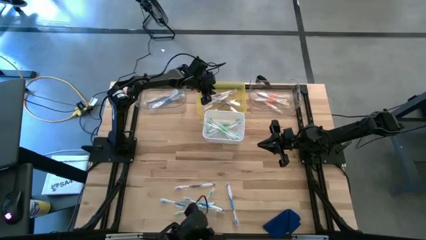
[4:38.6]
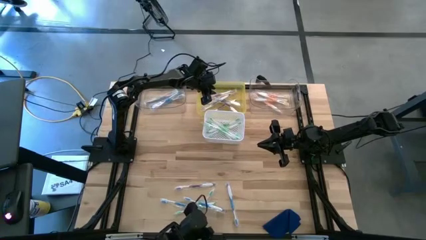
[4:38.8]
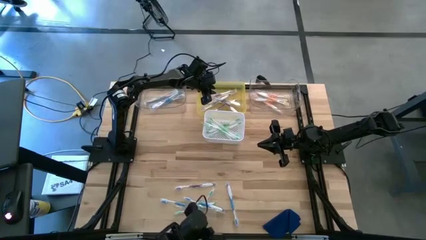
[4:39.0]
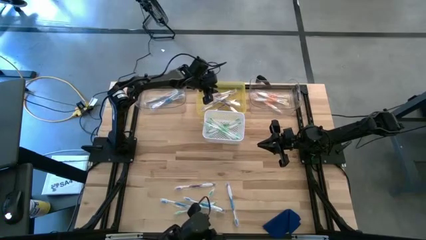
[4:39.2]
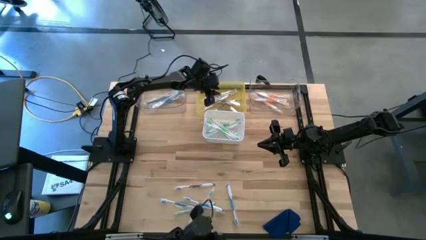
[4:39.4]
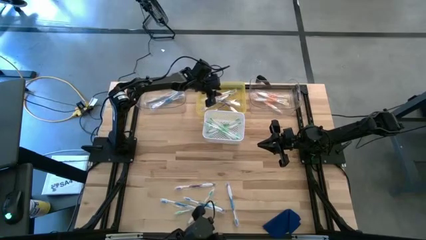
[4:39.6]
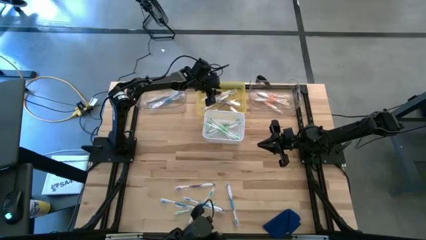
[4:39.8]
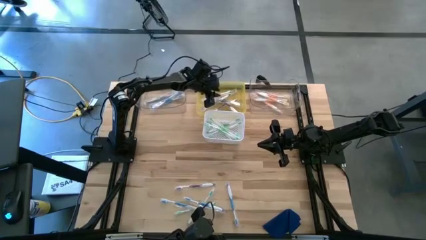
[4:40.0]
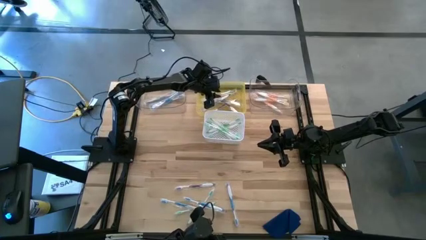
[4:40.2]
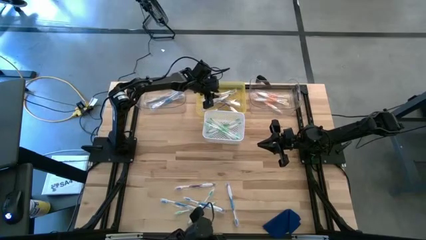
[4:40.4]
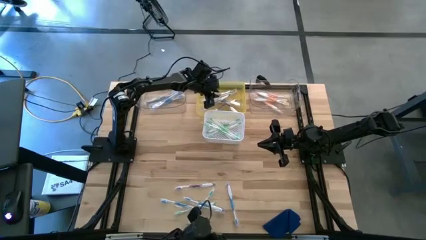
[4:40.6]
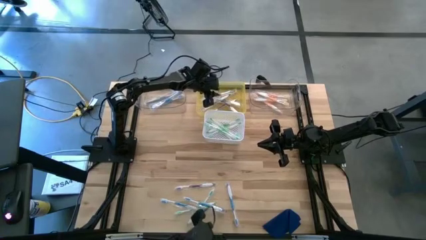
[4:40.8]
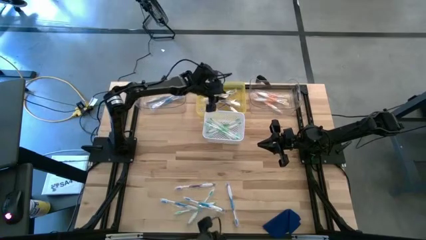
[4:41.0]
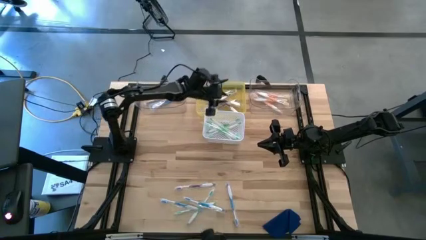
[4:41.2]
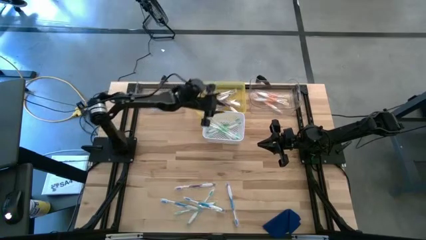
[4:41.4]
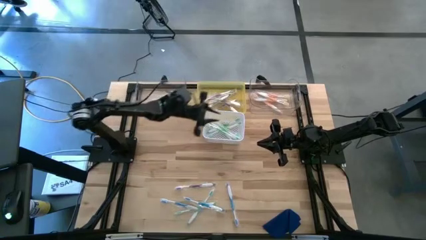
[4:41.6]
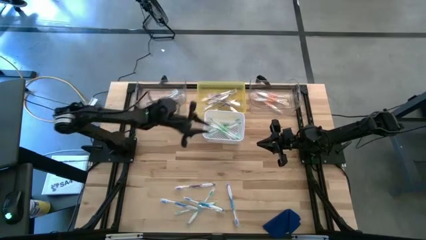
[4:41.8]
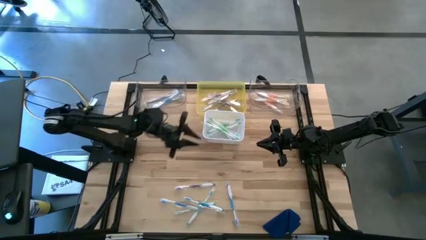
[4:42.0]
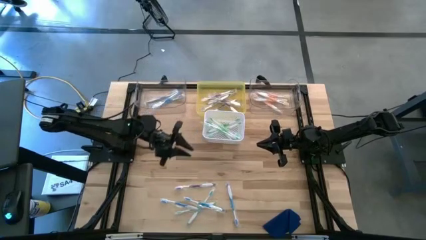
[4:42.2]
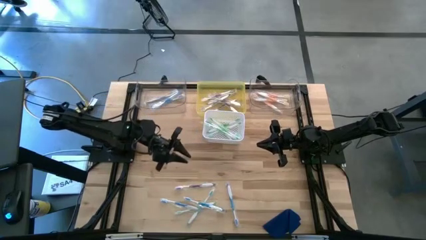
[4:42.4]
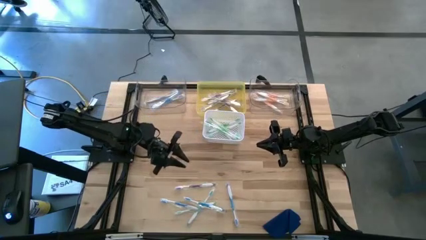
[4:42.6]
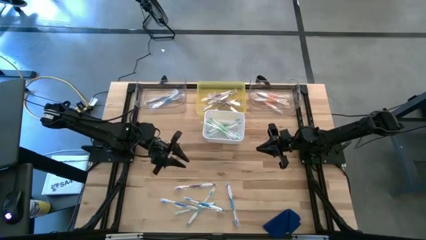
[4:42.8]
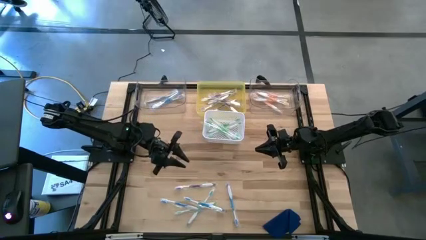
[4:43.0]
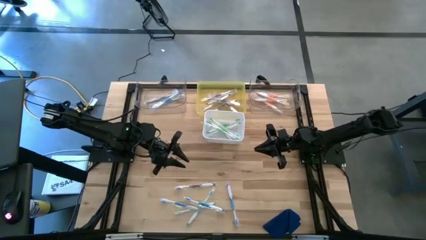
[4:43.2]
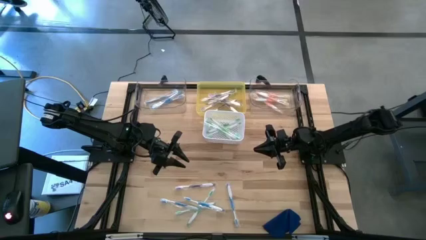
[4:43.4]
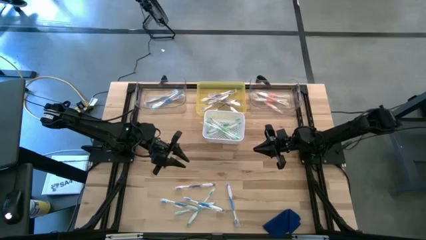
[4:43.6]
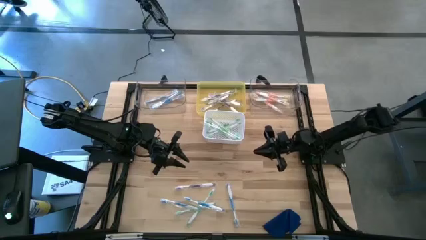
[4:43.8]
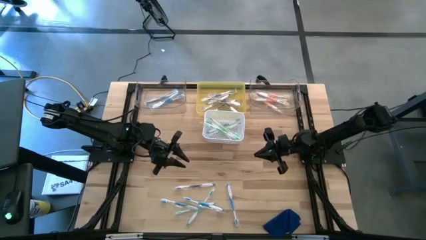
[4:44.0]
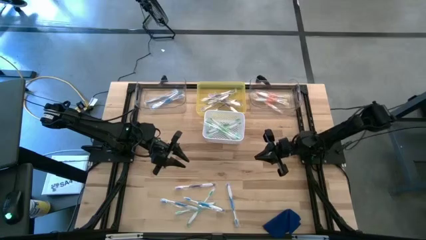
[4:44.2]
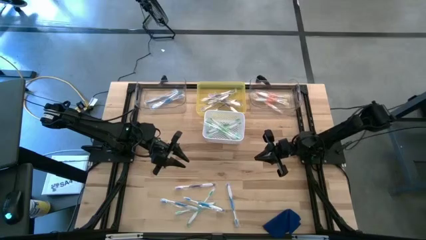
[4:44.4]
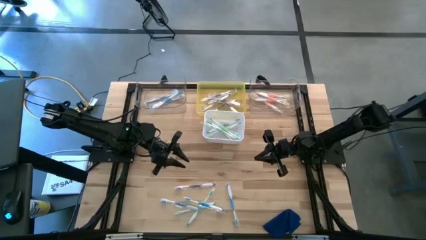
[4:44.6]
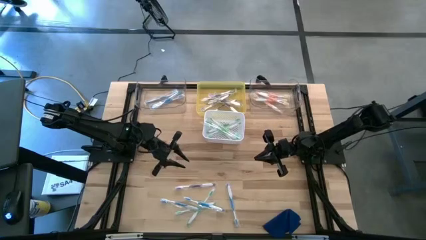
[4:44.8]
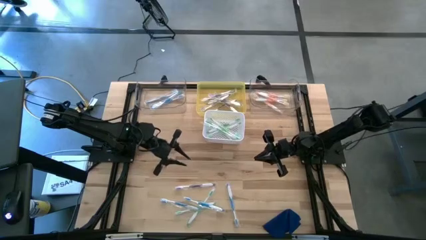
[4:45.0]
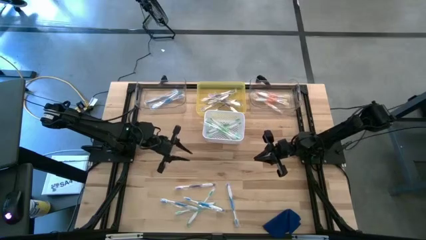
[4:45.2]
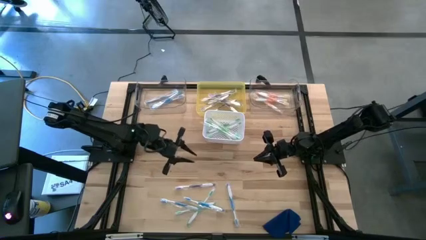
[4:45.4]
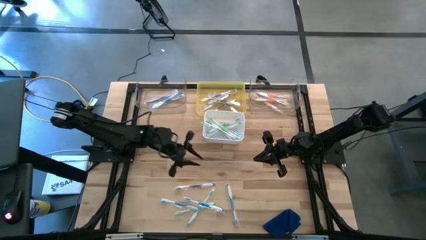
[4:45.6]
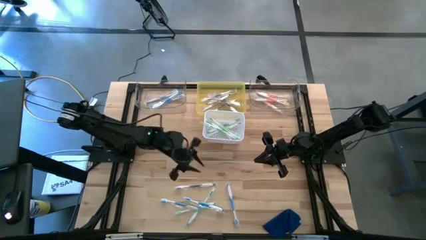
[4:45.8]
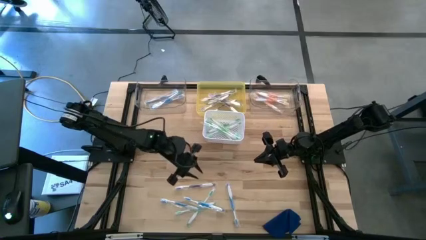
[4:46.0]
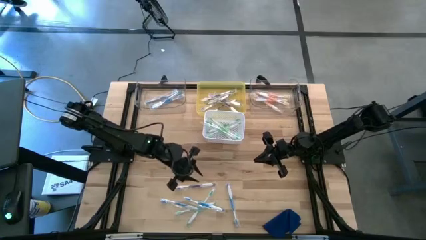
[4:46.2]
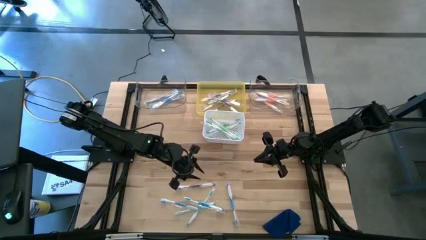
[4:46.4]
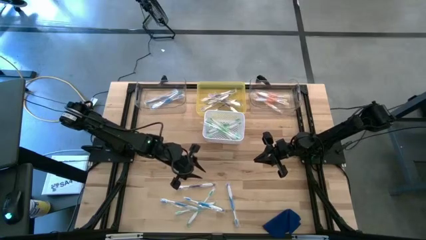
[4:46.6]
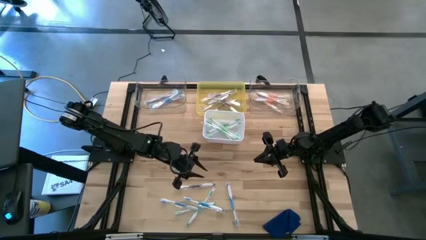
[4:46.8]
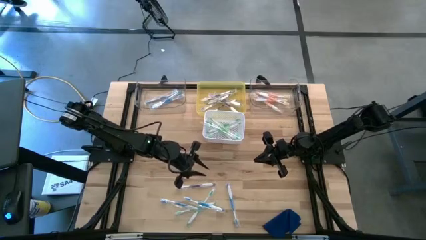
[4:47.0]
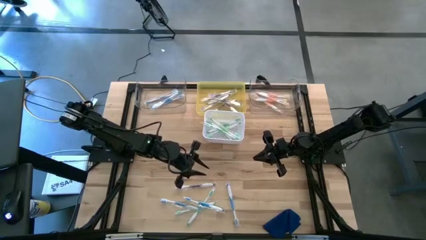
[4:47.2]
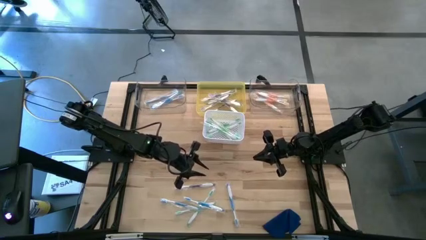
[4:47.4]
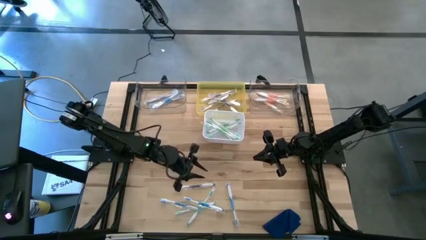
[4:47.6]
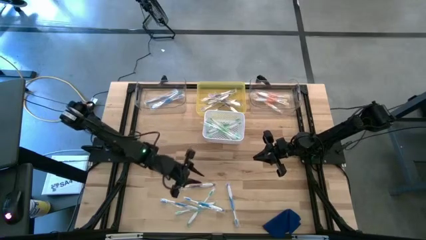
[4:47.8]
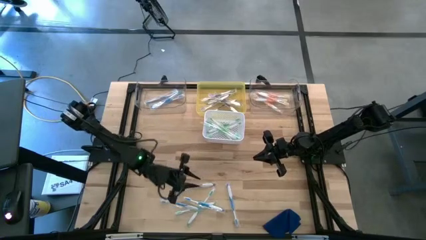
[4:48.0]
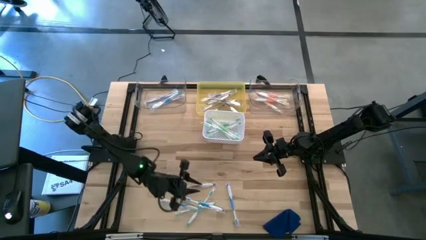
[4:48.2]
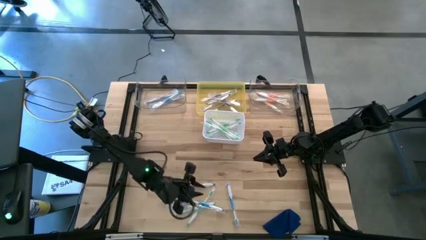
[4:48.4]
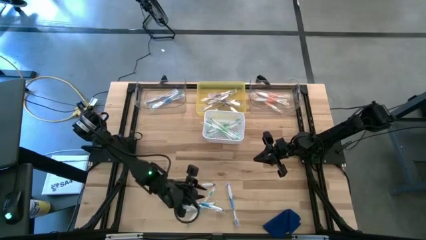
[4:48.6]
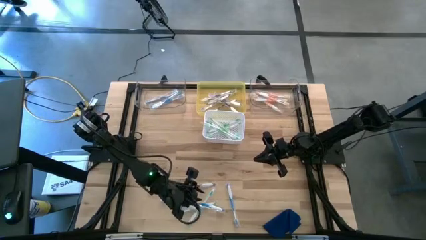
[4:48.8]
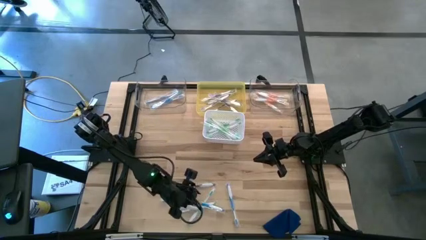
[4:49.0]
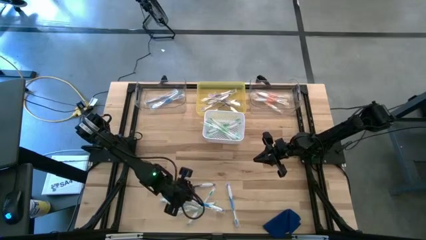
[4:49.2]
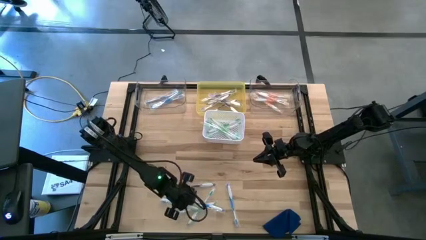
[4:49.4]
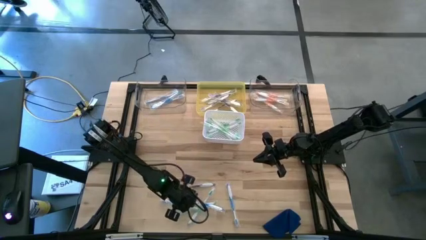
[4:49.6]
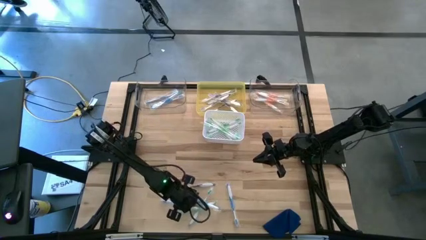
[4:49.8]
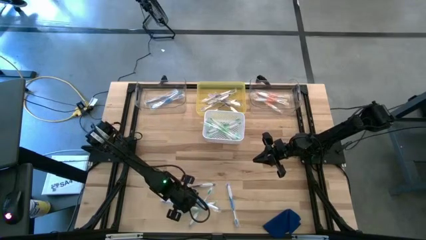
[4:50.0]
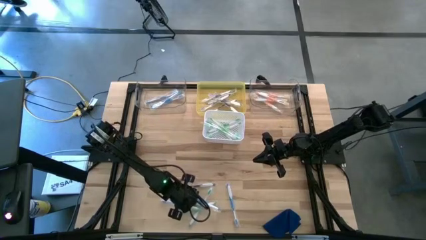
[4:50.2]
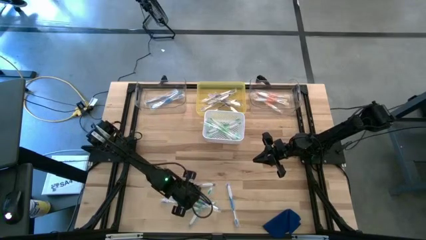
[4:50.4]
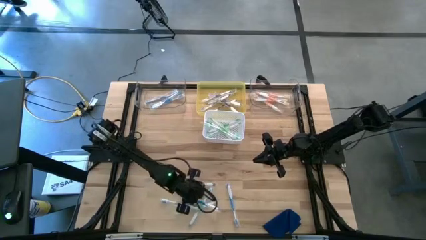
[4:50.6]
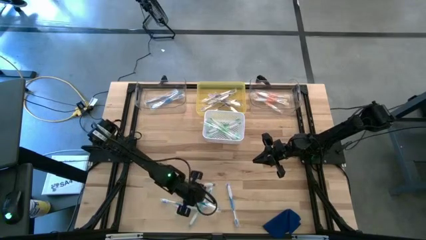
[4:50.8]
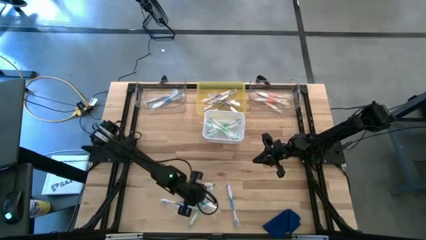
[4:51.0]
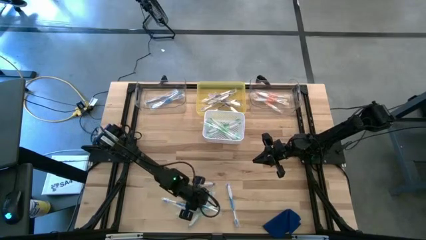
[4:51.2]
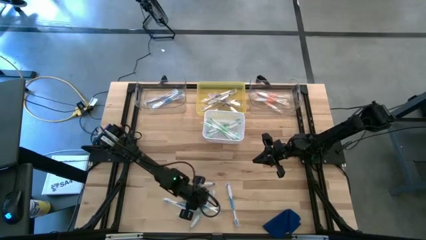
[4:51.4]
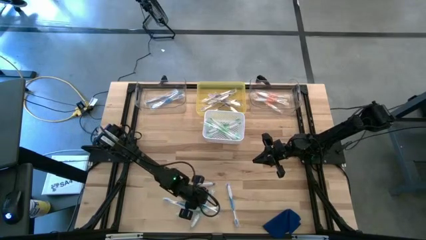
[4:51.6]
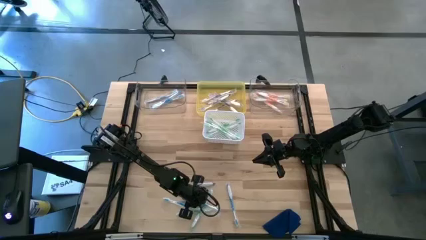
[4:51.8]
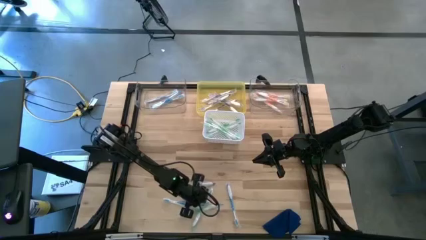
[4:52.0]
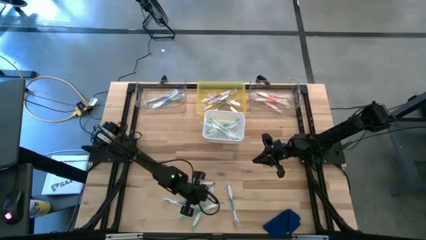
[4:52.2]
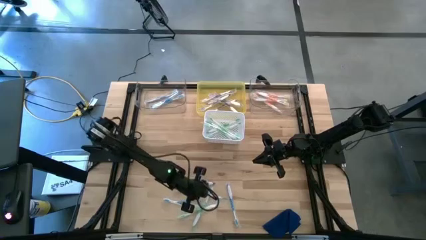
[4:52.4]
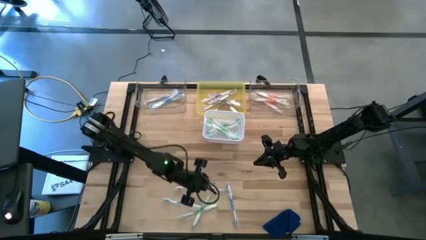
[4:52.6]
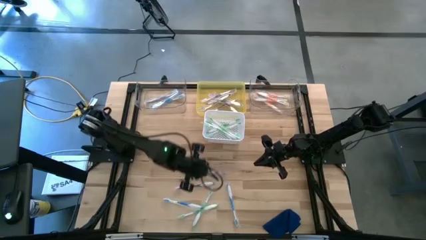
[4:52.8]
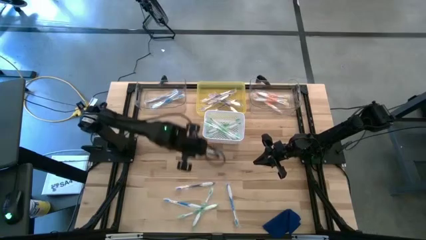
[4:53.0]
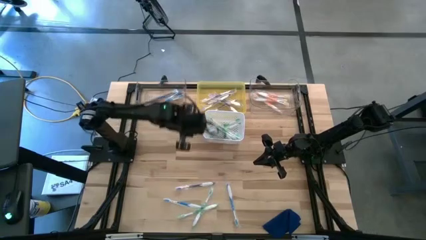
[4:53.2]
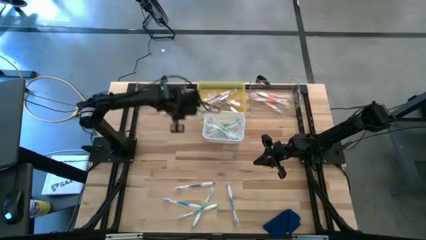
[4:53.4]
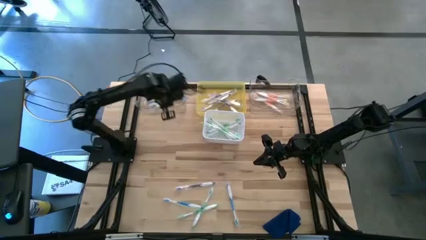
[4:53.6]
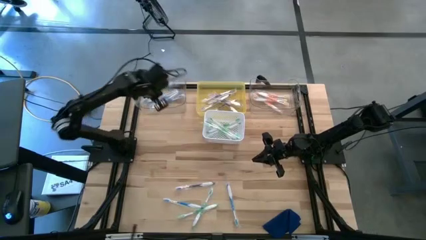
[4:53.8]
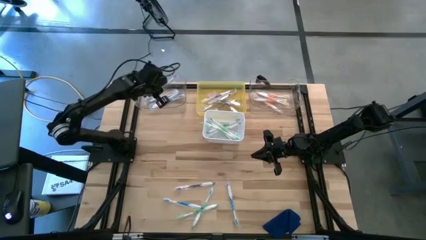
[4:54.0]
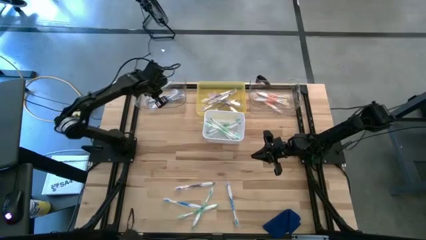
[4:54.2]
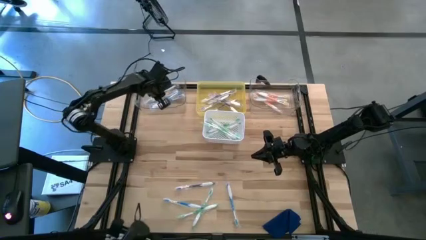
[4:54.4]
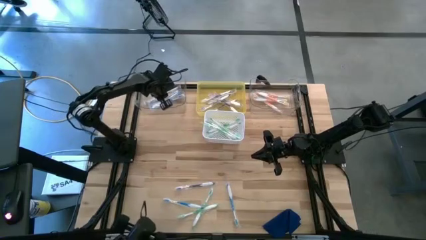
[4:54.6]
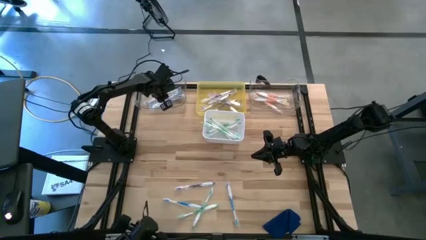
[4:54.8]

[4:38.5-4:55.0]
Task: Pick & Place Toothbrushes
Put the blue toothbrush into the left transparent bin
